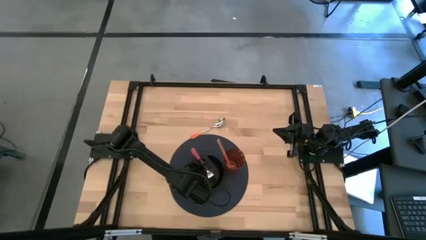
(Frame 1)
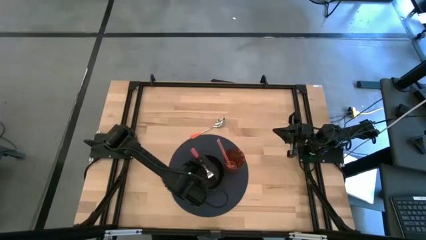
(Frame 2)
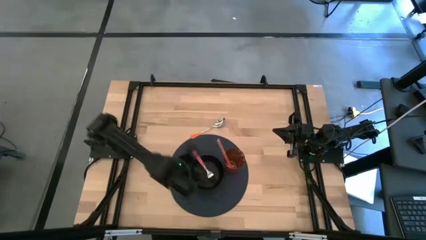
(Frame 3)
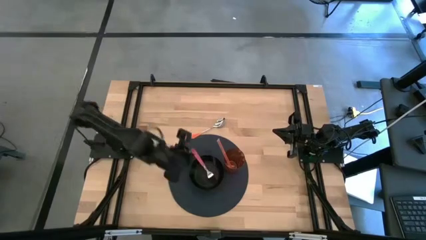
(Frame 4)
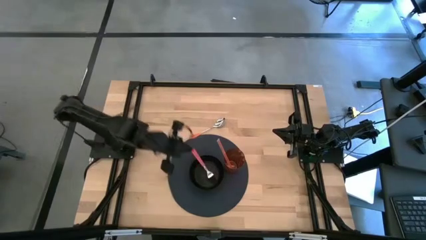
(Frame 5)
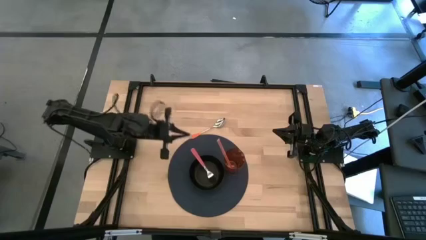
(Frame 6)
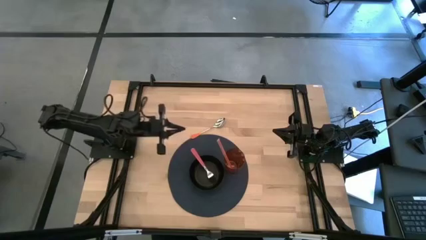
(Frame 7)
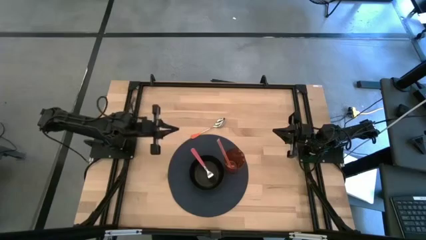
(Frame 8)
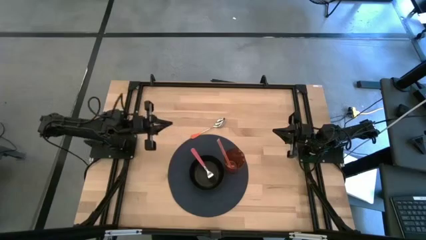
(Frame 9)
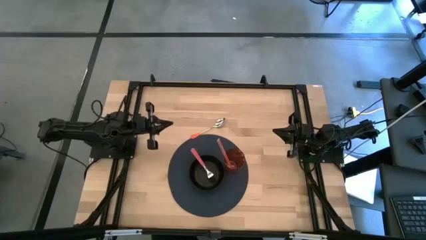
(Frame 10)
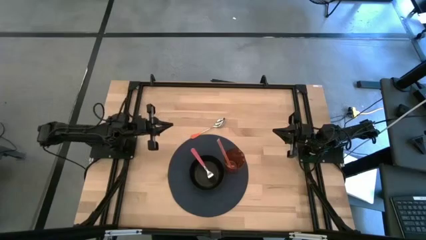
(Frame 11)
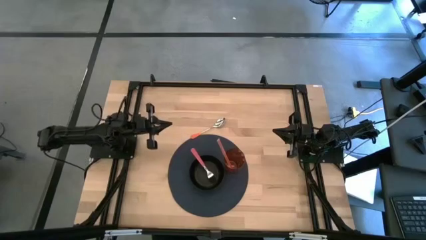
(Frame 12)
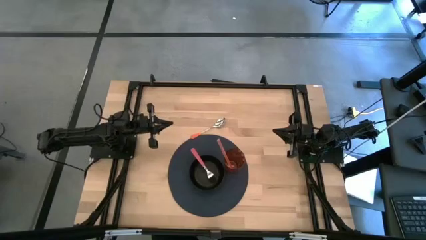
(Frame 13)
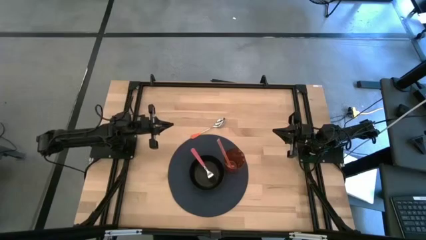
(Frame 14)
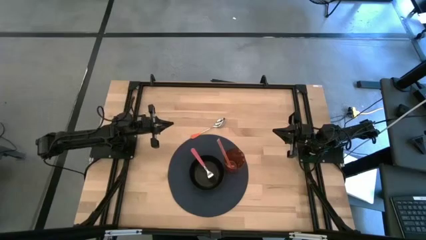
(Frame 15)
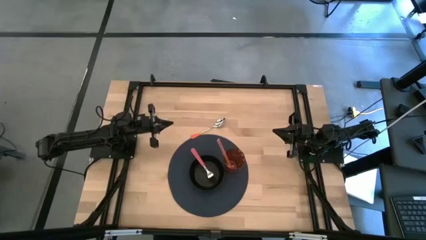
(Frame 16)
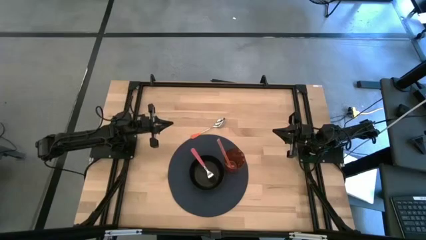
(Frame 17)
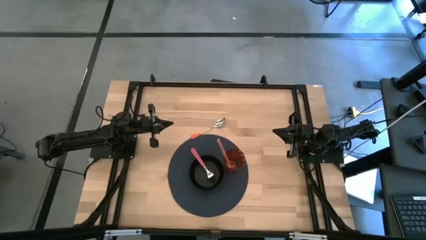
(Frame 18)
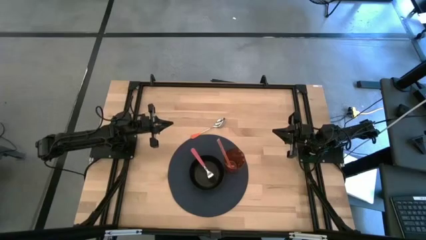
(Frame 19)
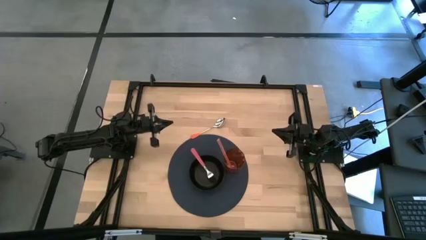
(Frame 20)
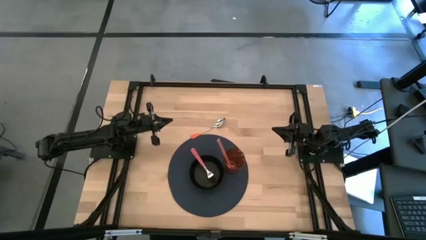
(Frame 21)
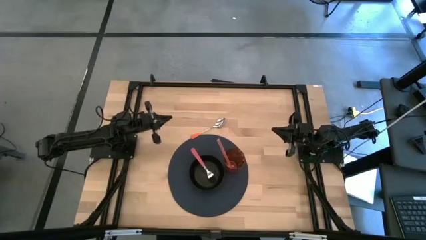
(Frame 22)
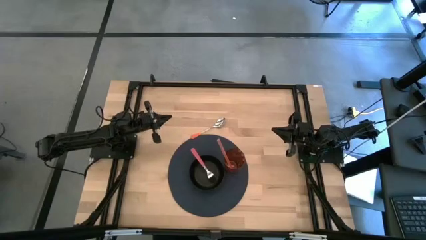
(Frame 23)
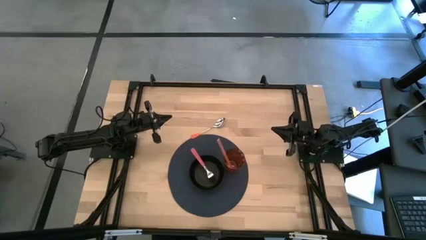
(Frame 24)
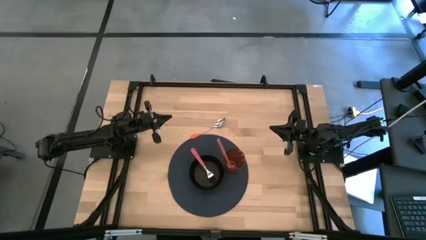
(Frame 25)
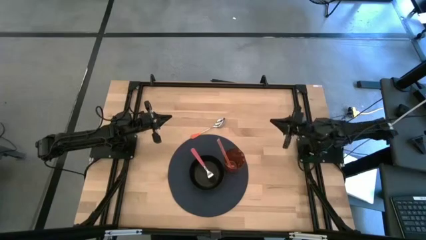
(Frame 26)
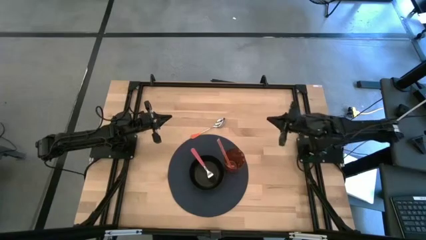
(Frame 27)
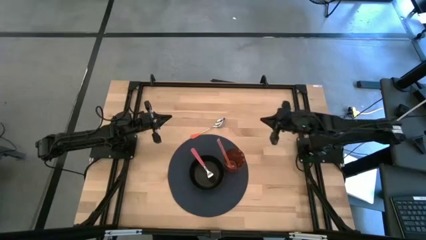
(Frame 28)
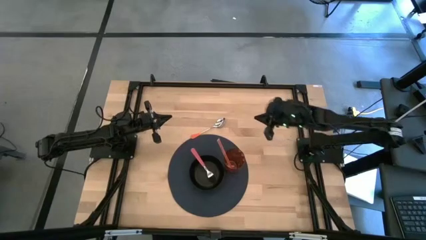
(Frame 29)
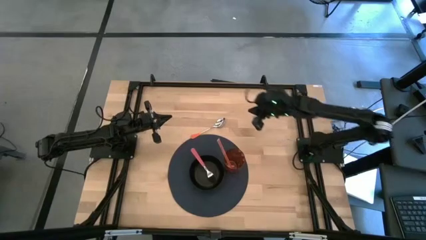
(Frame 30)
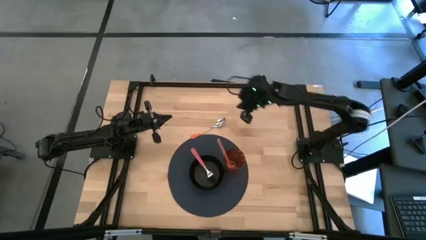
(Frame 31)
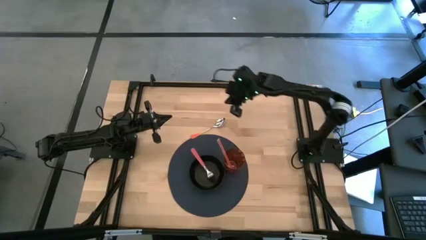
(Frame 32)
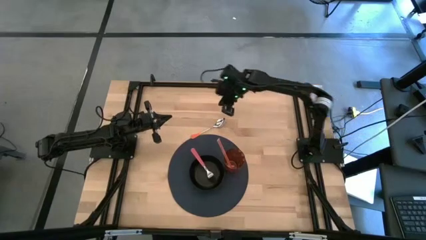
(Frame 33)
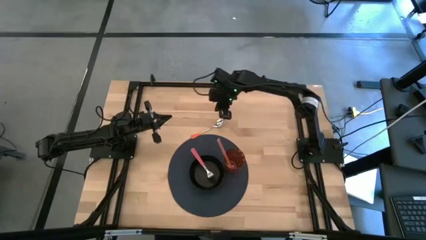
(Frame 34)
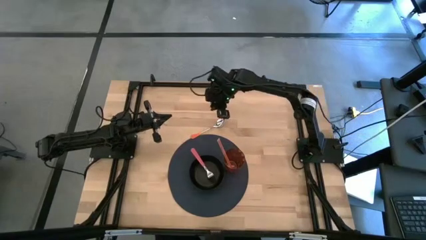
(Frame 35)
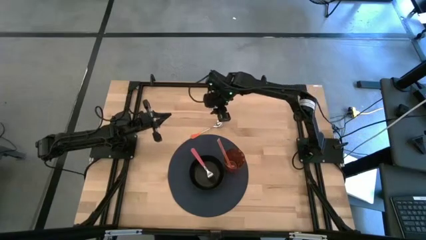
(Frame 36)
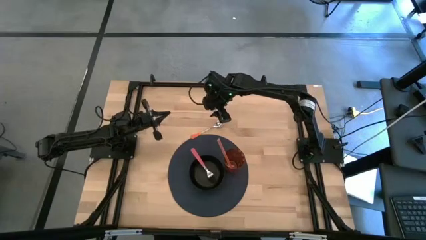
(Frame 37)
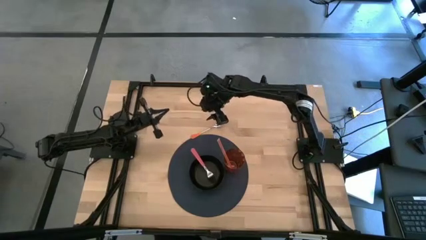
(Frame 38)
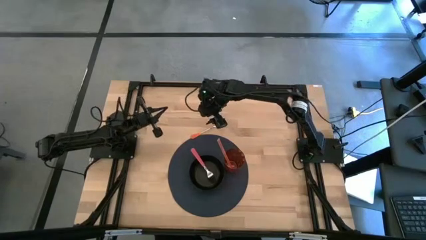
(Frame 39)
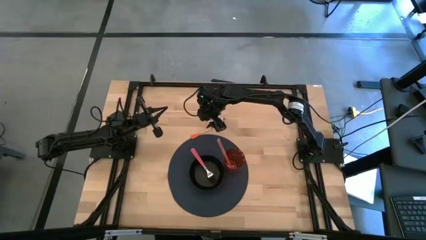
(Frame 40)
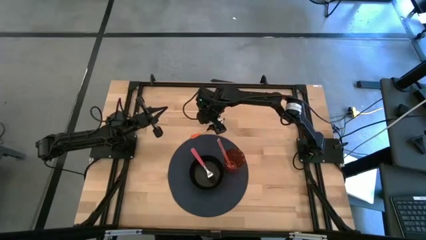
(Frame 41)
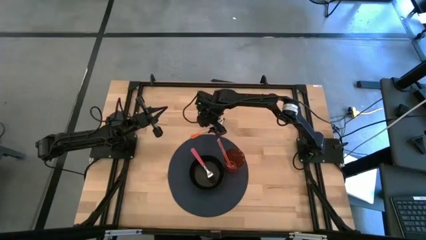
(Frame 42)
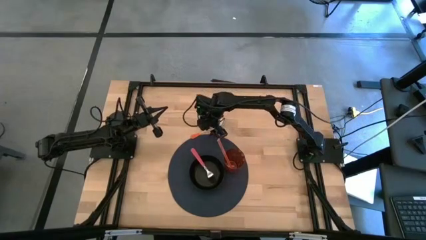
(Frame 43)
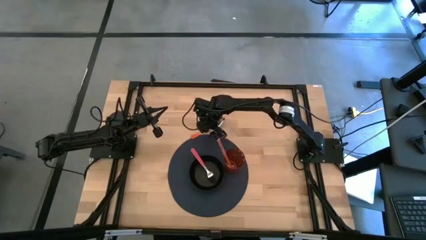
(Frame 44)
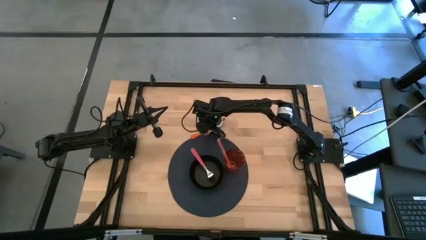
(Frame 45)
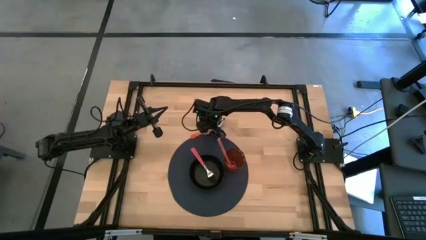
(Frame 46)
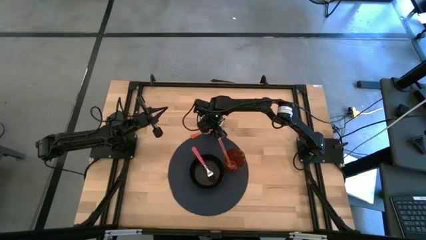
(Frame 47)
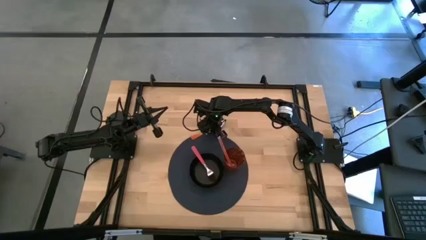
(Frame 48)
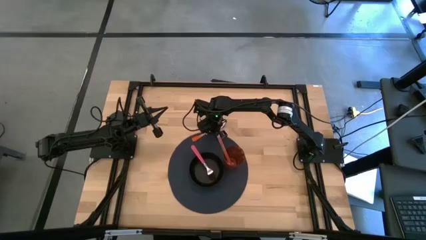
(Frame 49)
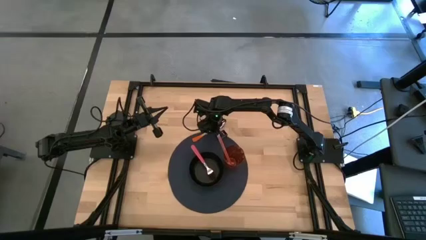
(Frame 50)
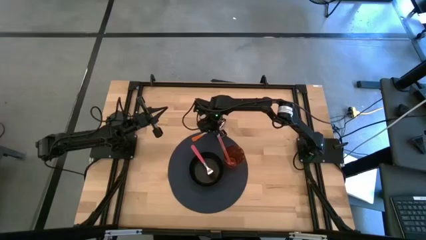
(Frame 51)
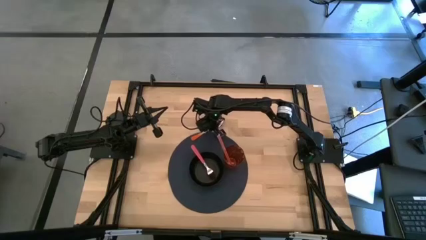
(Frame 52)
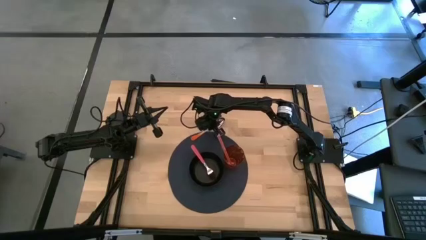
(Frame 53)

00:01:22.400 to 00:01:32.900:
Task: Pick & Place Utensil
Put the orange spoon into the black bowl

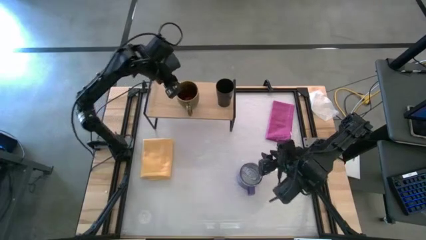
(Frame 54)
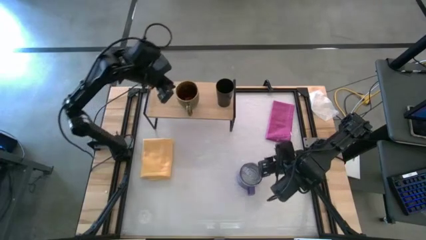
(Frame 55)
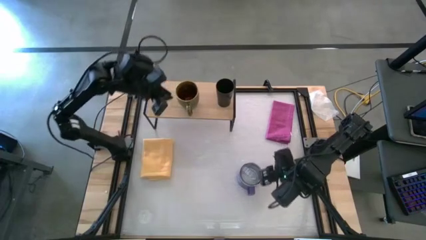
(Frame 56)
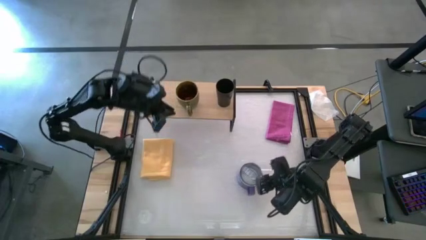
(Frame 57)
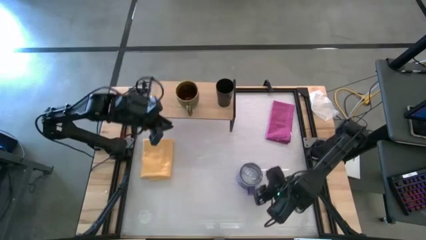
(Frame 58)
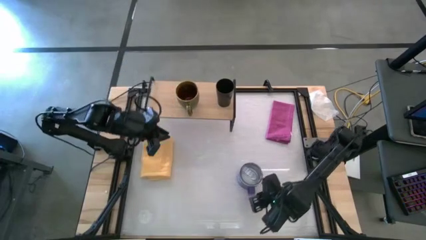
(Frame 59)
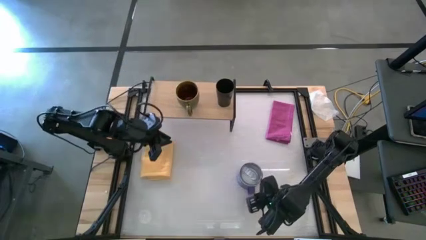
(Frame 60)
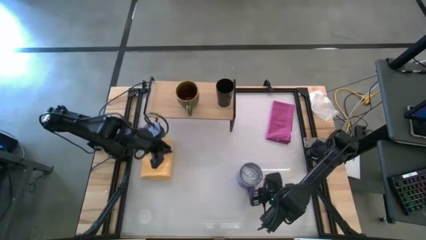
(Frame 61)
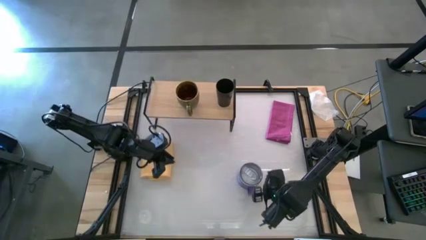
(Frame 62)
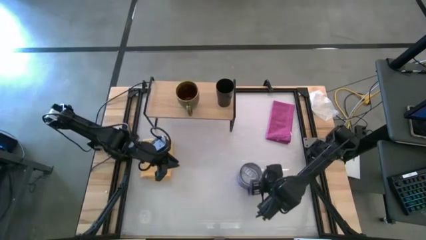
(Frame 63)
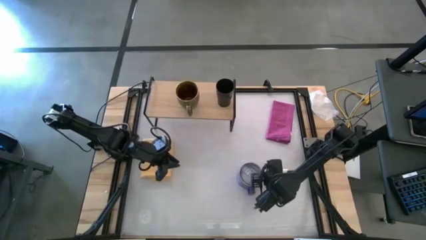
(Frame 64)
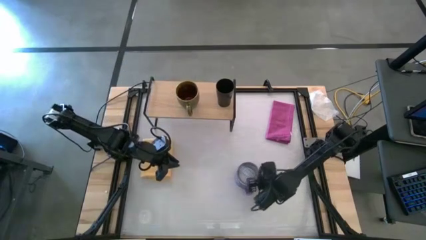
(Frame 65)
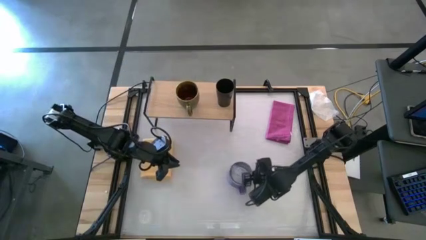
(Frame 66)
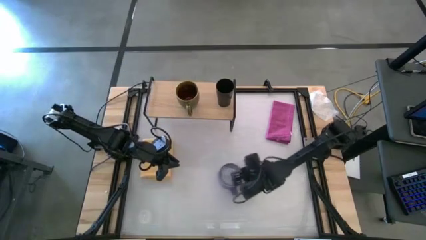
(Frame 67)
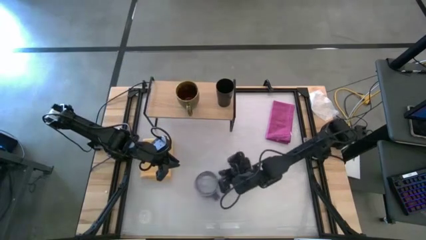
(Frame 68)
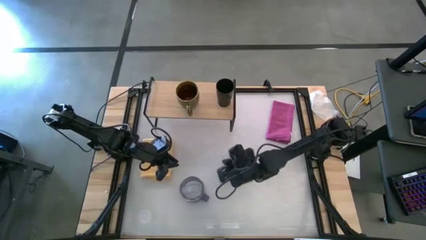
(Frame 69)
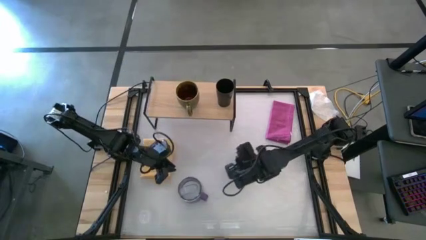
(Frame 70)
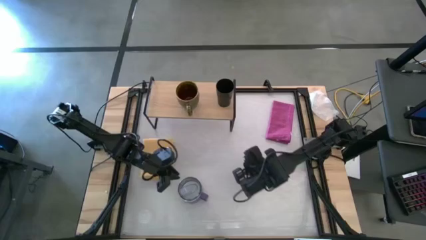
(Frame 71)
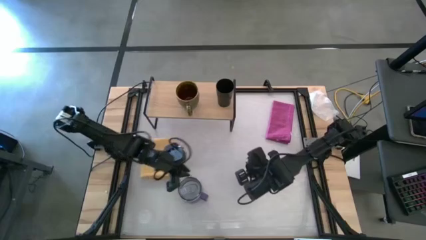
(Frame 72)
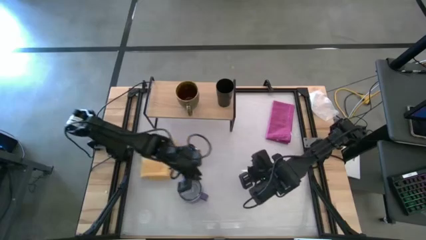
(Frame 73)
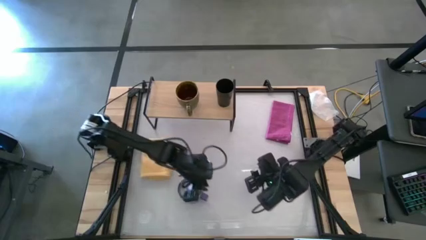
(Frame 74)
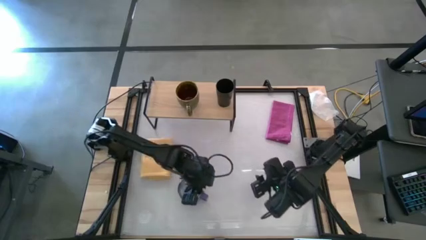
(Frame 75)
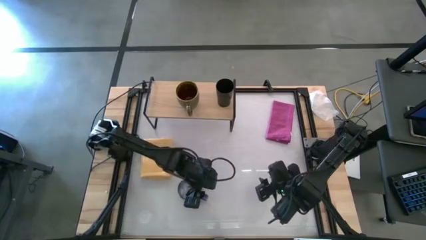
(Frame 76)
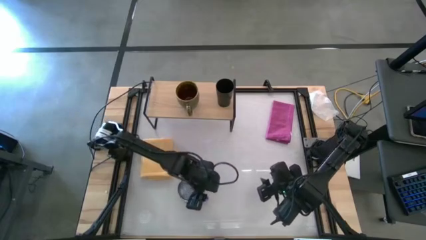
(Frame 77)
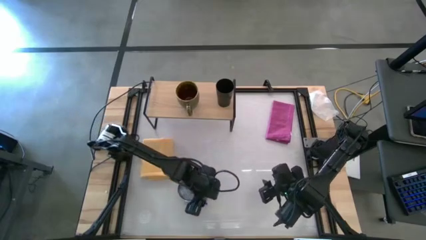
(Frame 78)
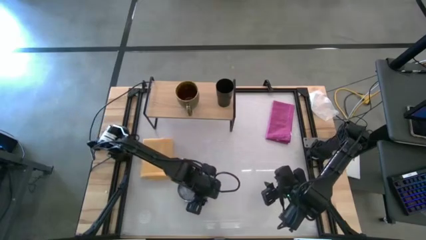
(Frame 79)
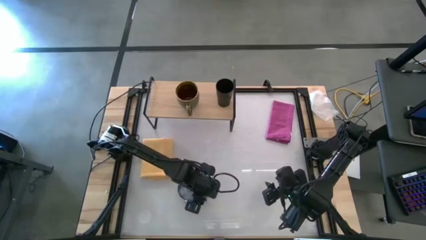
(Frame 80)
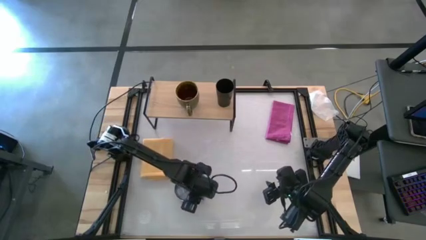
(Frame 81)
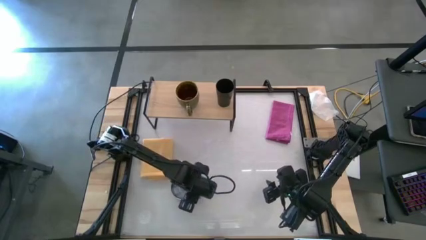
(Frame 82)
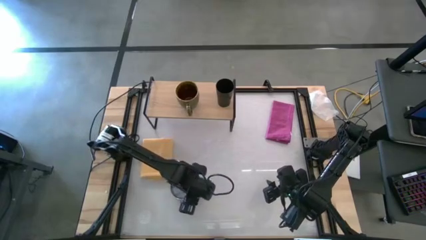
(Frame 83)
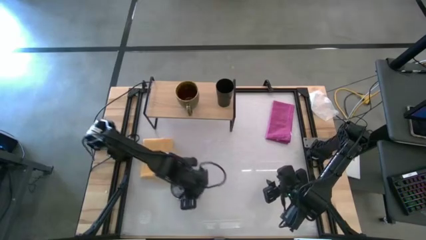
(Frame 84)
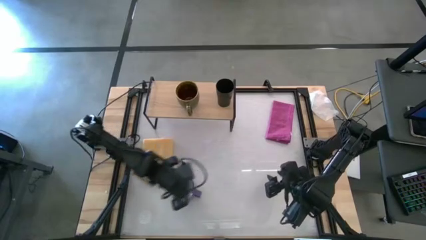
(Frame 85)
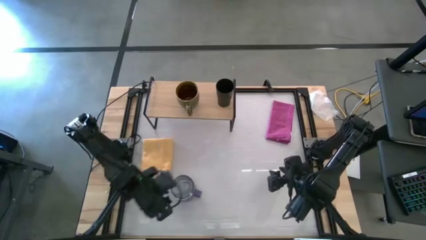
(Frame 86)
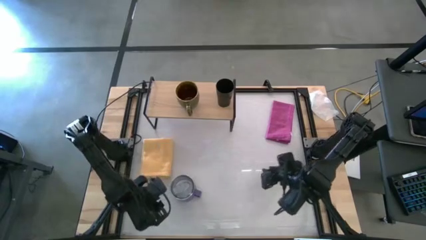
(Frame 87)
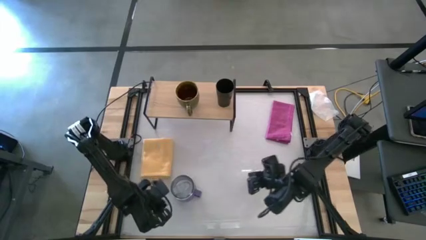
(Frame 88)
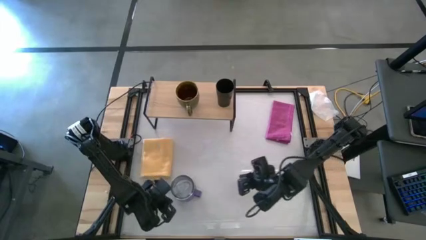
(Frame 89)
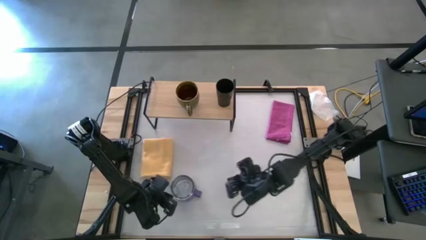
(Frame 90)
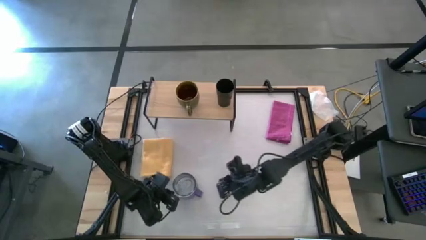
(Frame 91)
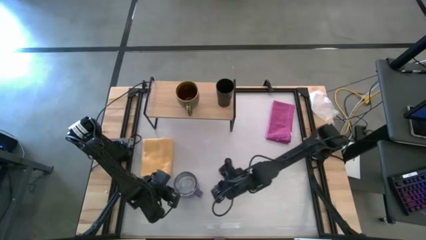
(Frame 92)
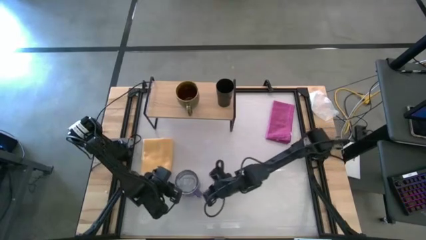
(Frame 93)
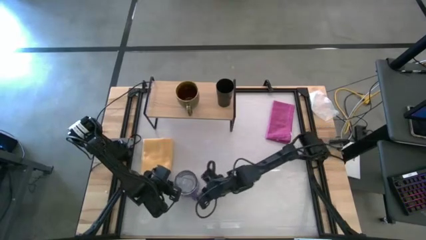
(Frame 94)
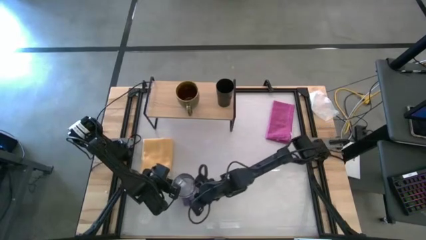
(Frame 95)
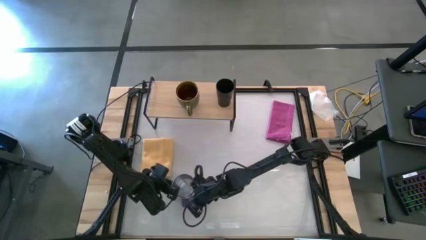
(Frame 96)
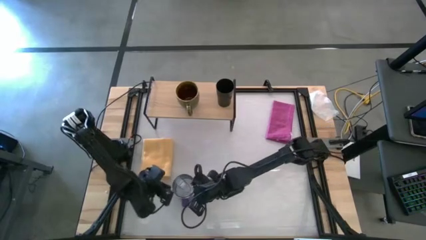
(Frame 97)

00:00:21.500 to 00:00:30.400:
Task: Stack small to large cups/mugs on shelf
Move the purple mug to the bottom left of the table
